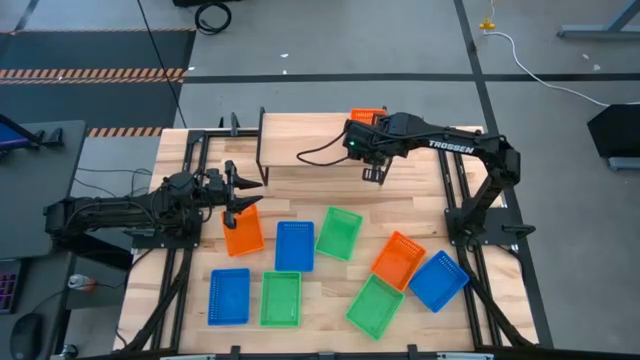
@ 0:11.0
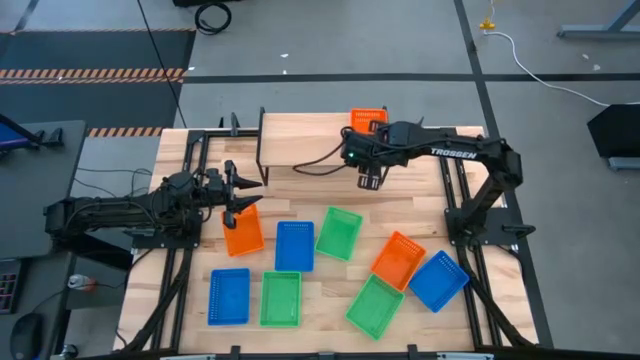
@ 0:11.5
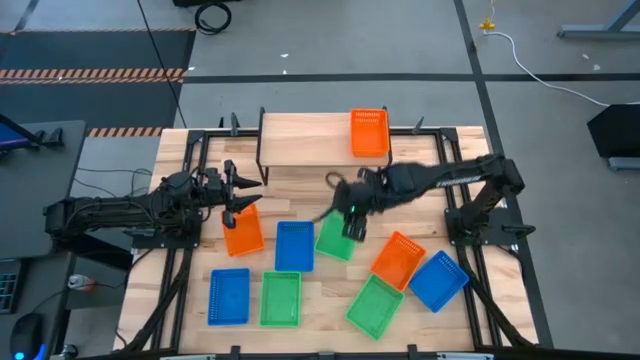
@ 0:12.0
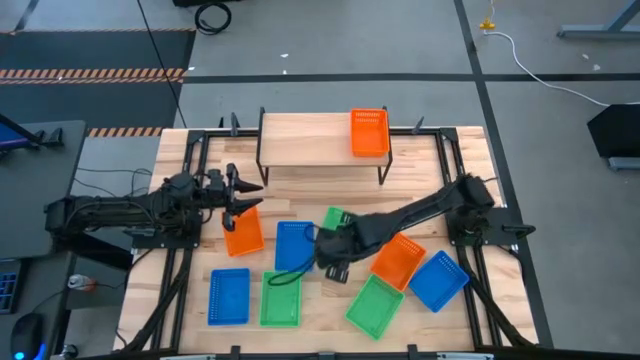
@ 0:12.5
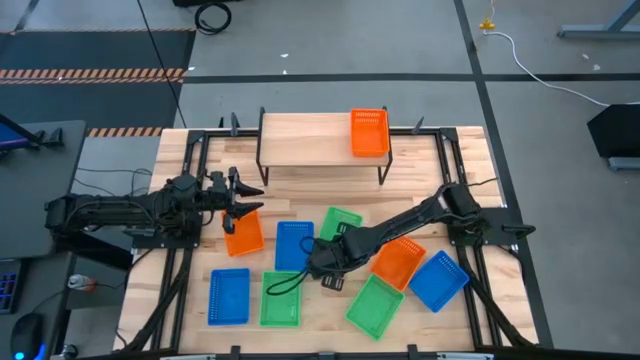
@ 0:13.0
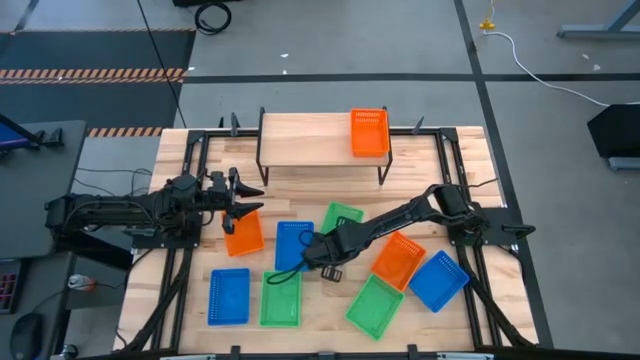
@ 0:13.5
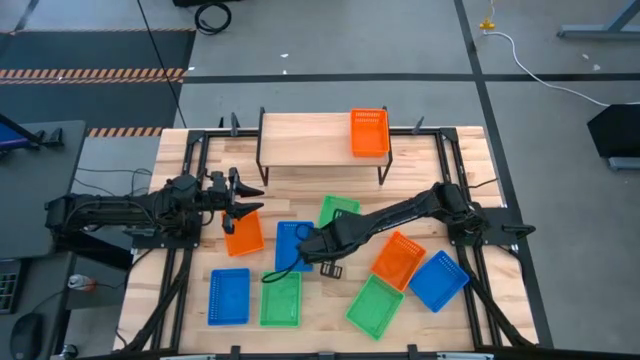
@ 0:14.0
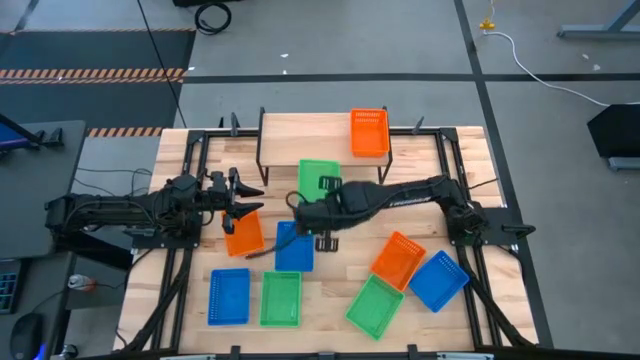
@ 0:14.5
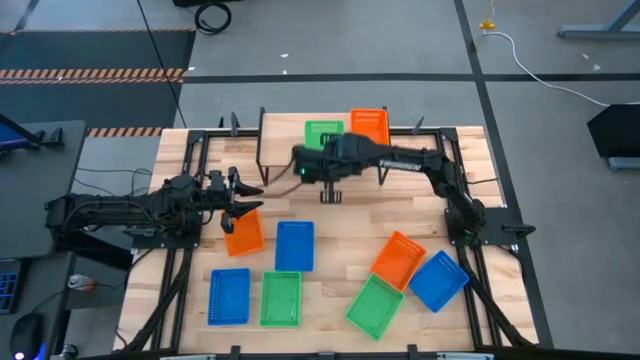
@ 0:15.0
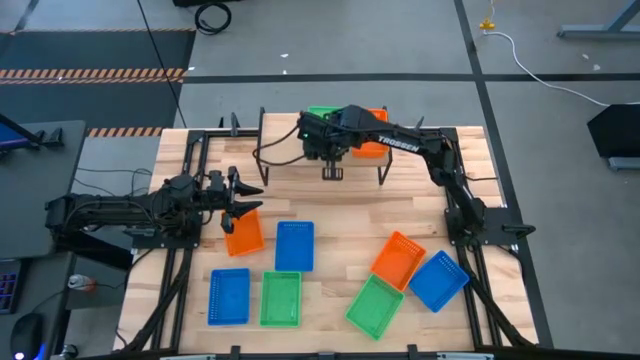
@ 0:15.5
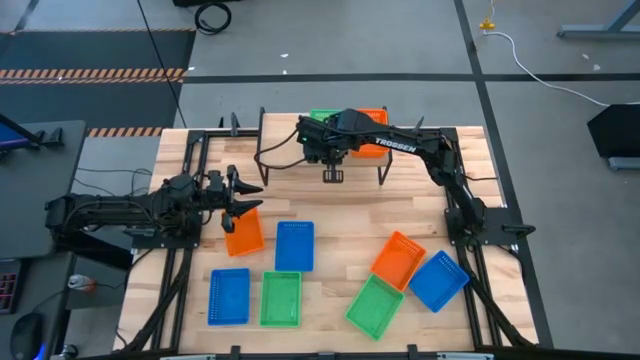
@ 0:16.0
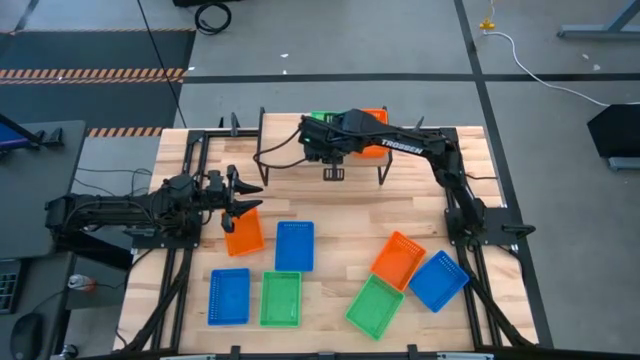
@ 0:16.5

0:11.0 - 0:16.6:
Task: Stack baskets on shelf by color
Put the top green bin on the shelf

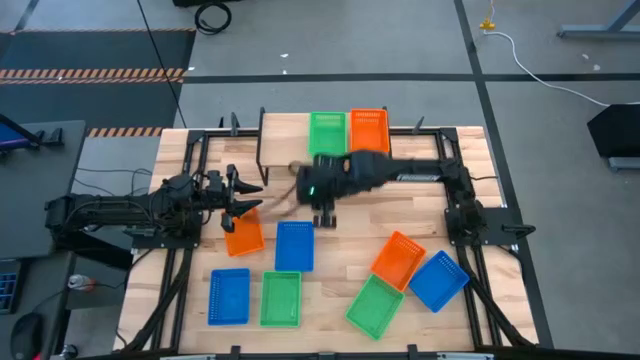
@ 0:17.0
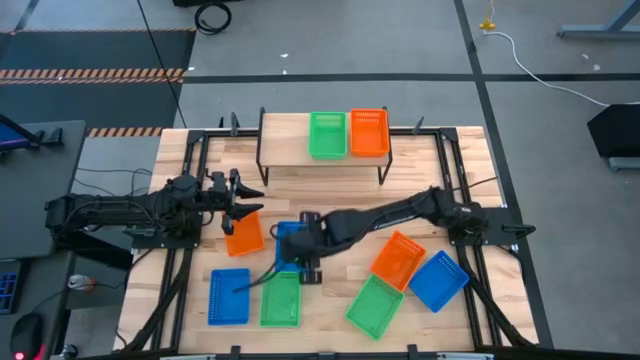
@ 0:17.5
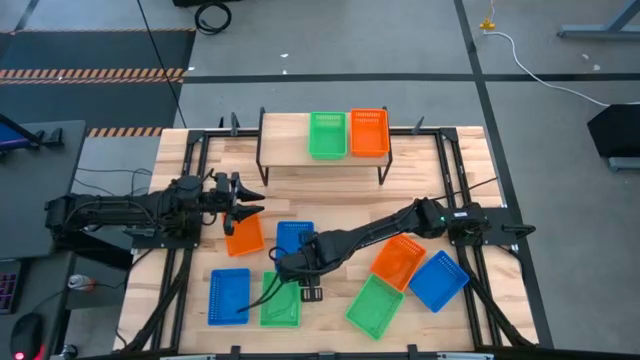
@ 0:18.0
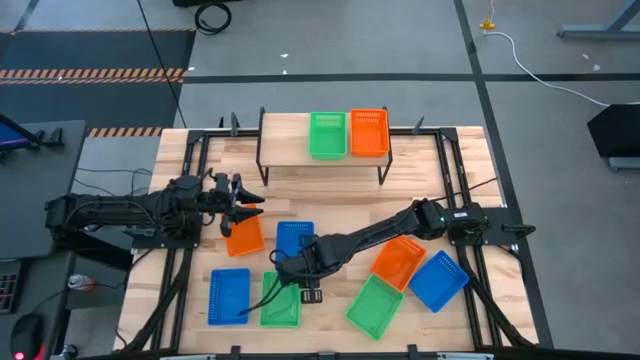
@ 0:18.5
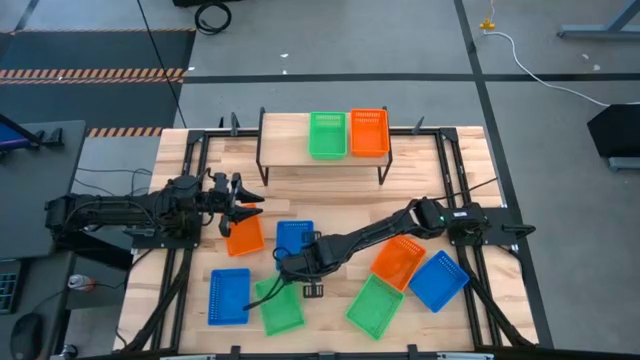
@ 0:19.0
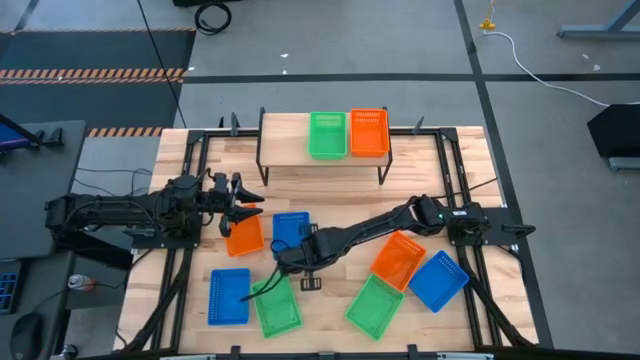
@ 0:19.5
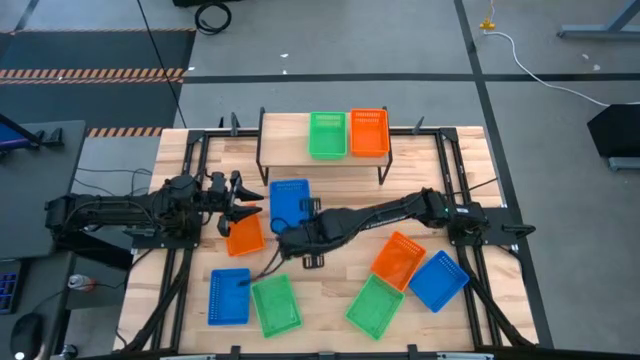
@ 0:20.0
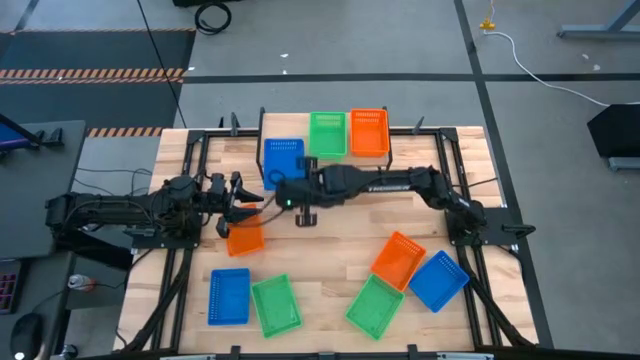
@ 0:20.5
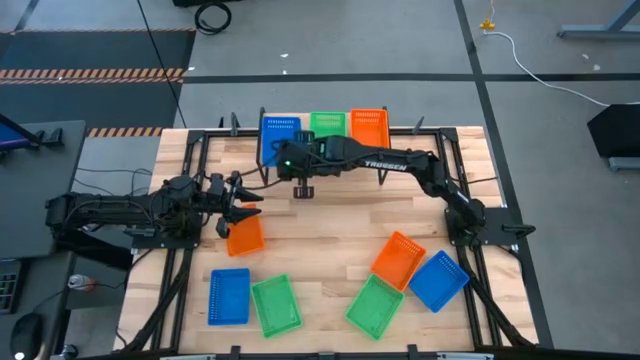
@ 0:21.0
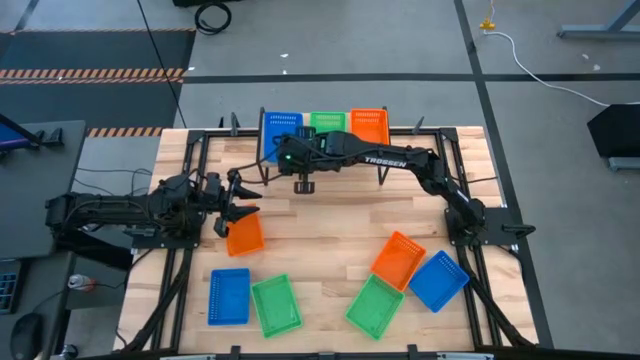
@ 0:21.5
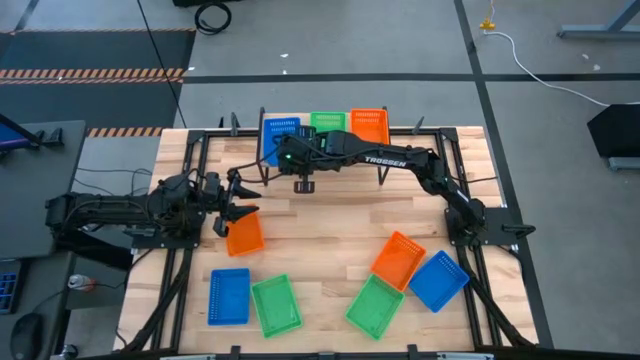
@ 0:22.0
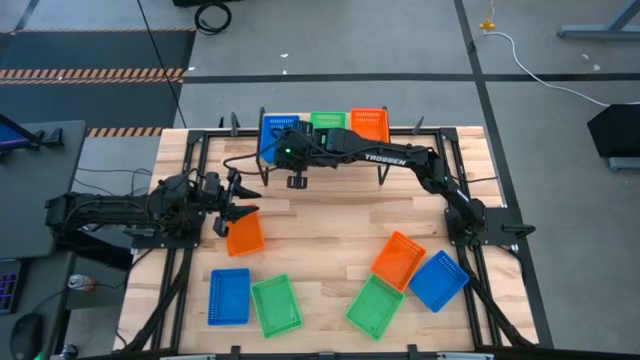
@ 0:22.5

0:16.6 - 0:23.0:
Put the middle blue bin on the shelf

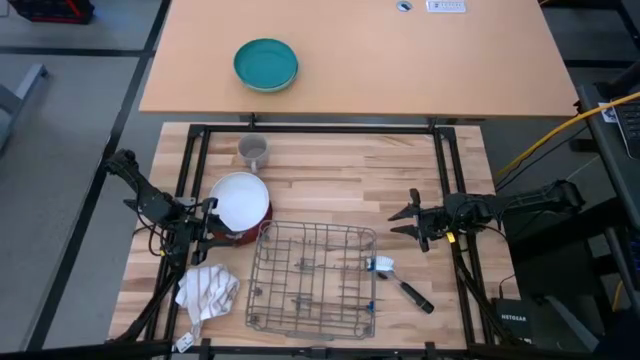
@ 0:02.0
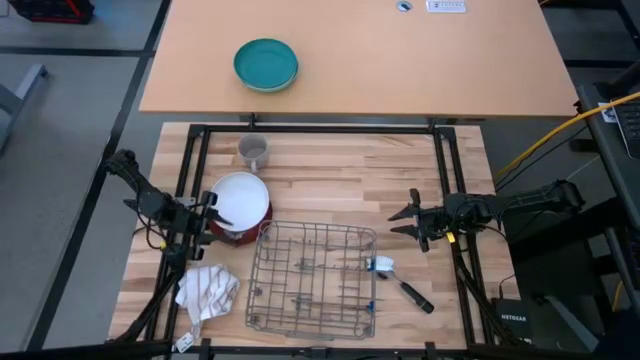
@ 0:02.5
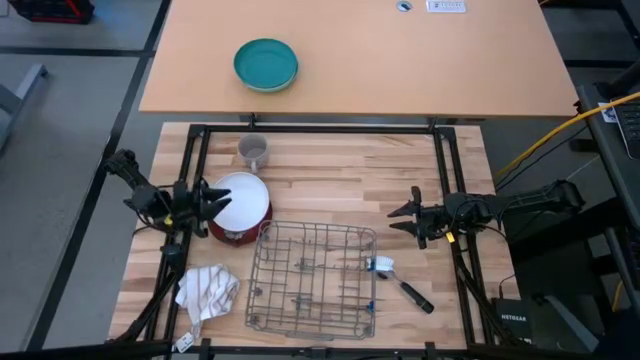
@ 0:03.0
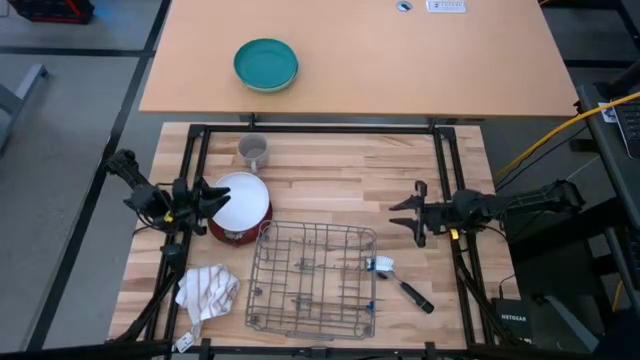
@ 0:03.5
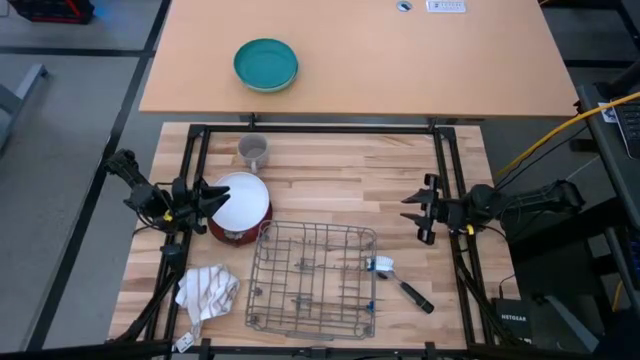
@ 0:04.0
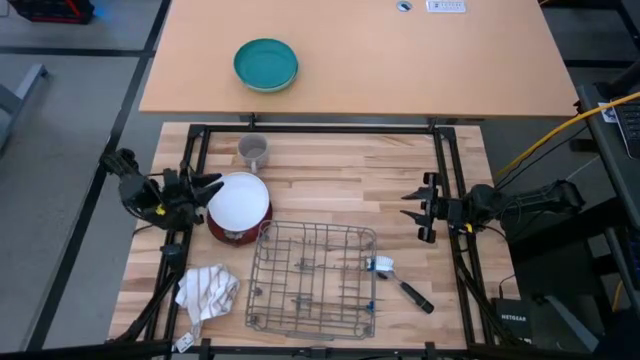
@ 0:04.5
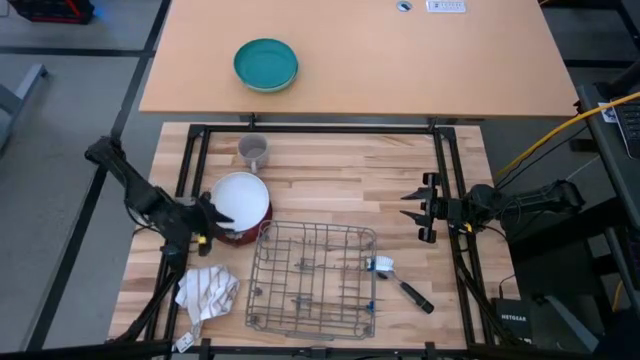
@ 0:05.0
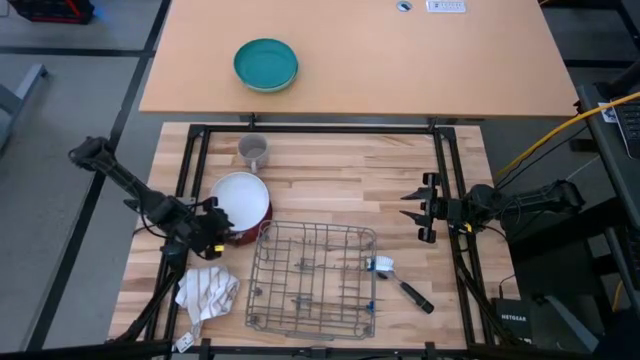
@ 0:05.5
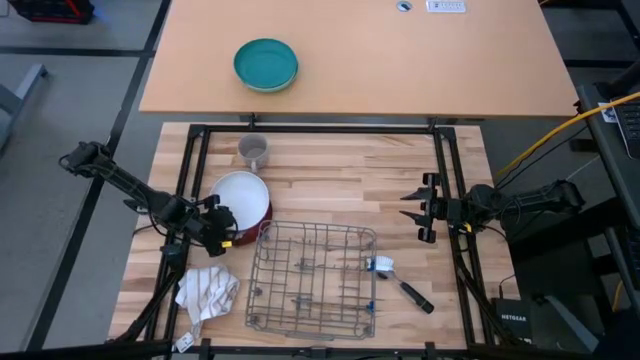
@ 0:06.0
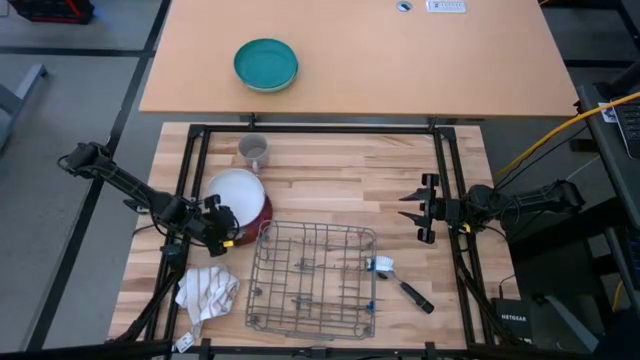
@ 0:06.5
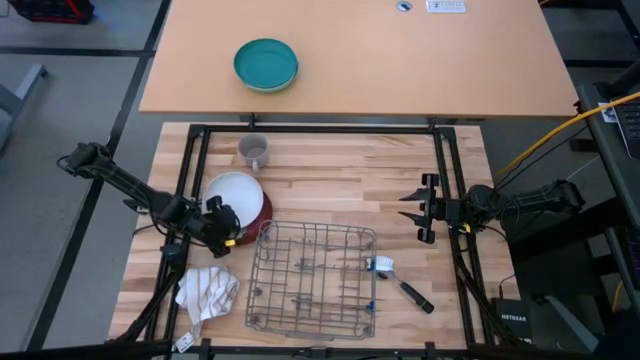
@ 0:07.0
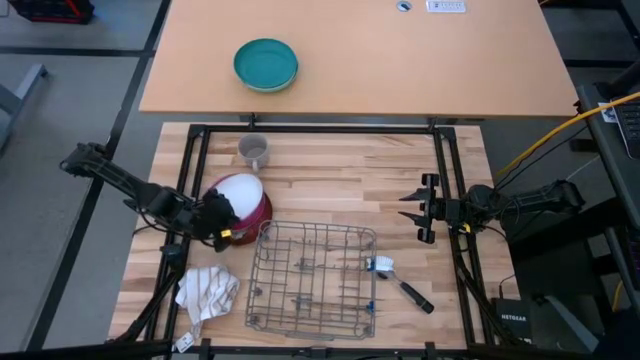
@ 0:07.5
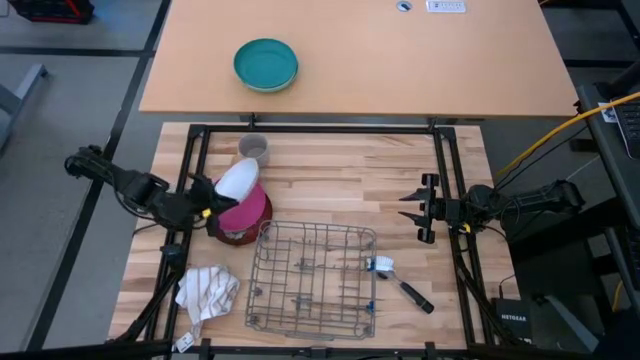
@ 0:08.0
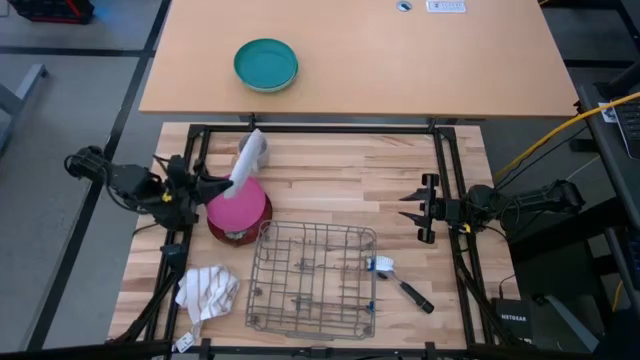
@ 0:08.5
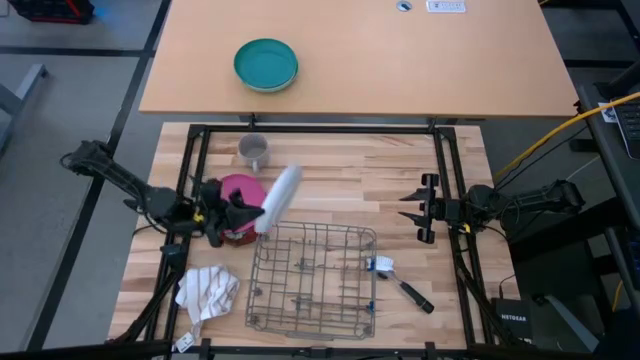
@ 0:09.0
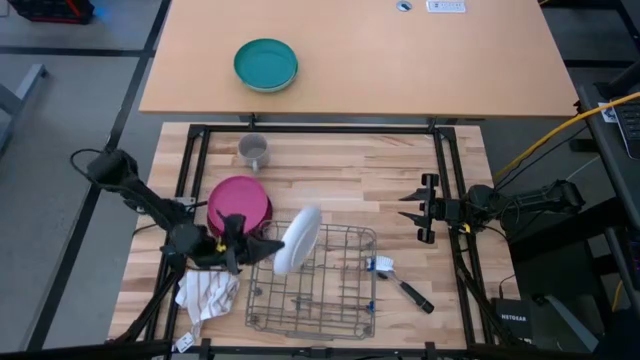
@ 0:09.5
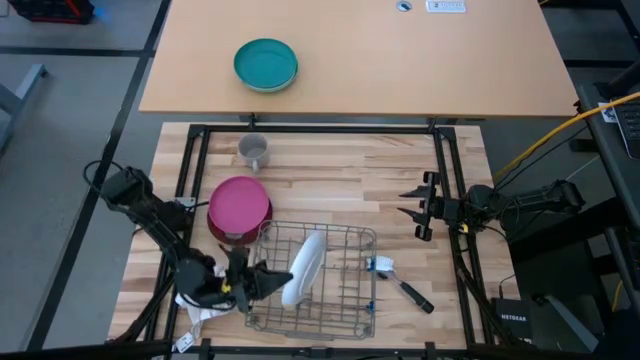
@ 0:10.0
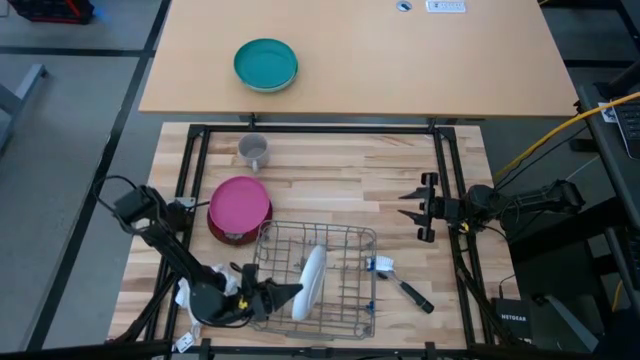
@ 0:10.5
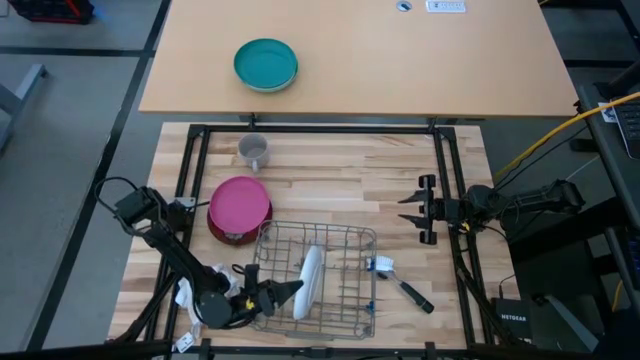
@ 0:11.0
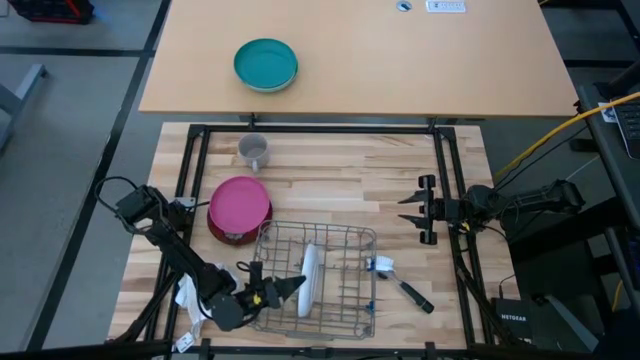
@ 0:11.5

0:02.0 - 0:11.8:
Task: Sort dishes
Put the white plate into the dish rack
